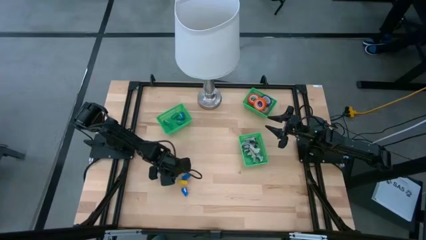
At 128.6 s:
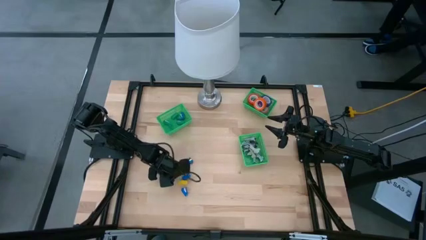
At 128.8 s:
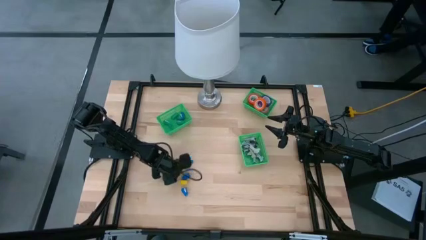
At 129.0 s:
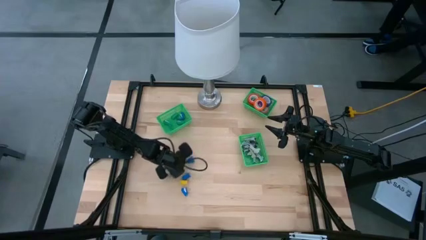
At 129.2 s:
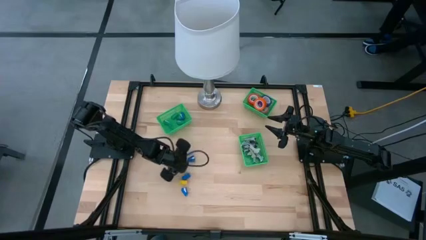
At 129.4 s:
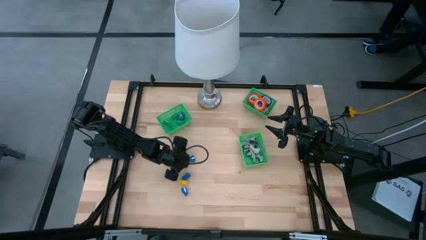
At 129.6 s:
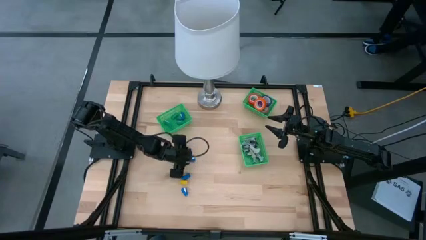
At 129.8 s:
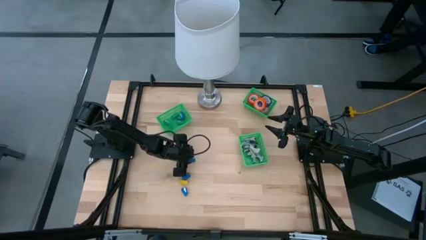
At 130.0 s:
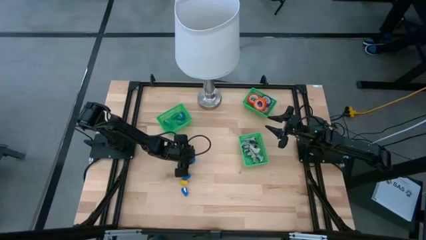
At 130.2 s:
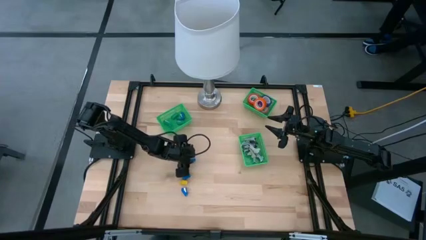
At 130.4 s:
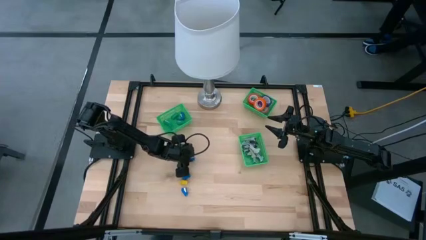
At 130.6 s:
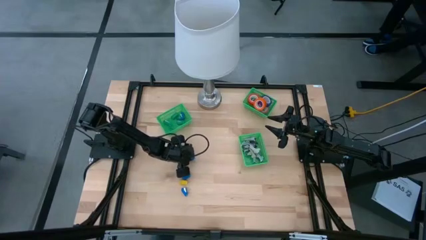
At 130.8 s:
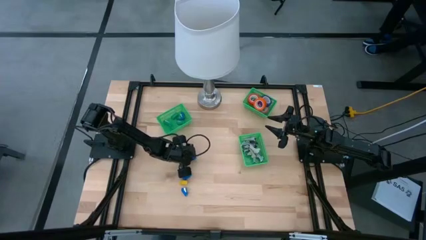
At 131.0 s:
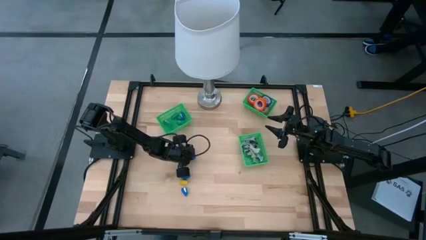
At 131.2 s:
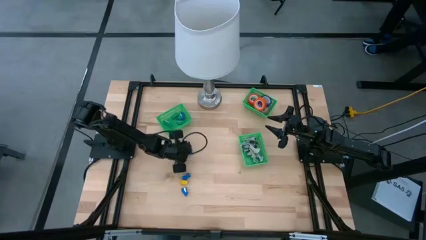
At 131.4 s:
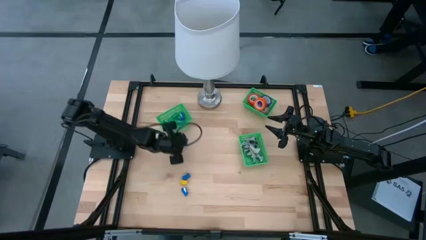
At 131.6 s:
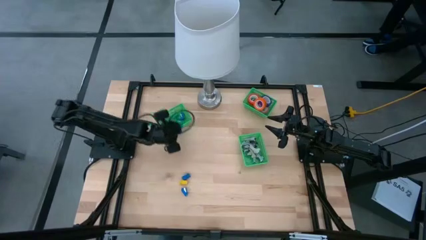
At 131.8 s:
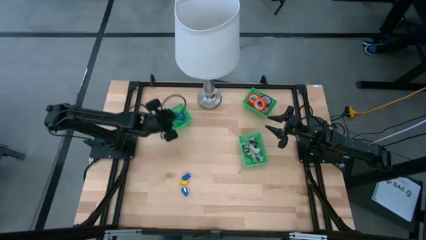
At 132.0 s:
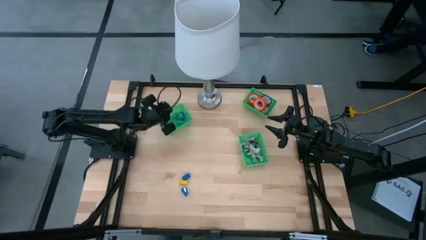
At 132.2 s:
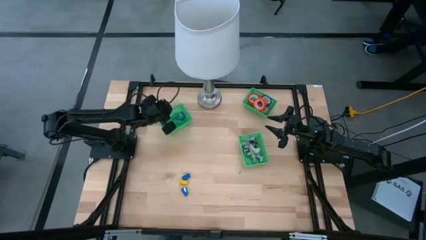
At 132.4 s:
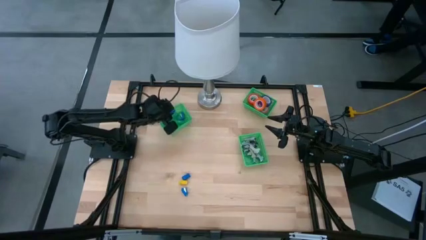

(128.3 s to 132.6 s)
Task: Pick and place Stapler, Stapler remover, tape
Put the blue stapler into the left green bin

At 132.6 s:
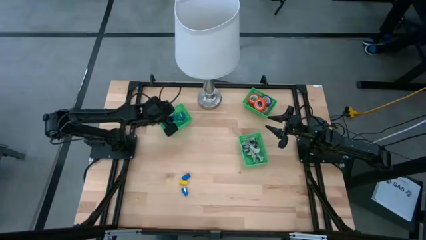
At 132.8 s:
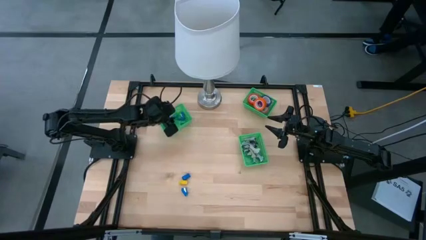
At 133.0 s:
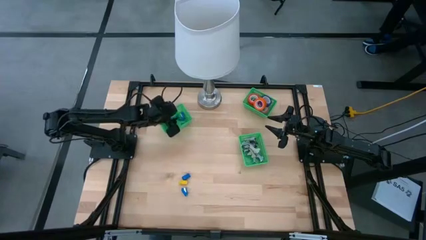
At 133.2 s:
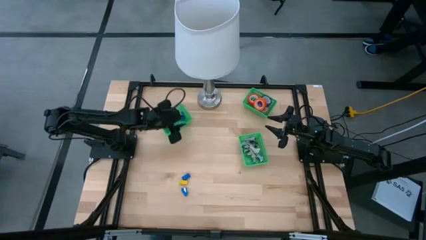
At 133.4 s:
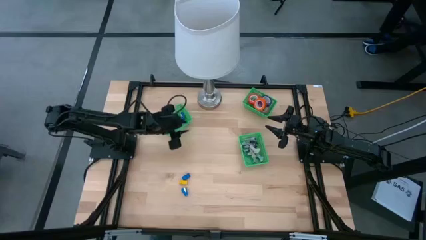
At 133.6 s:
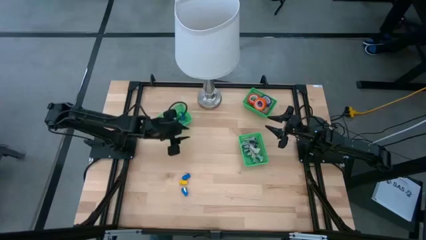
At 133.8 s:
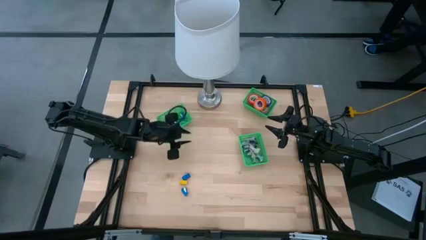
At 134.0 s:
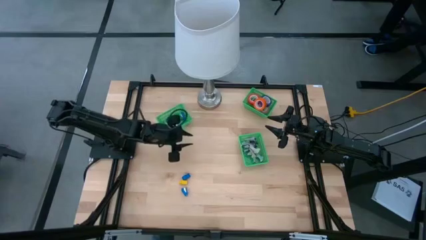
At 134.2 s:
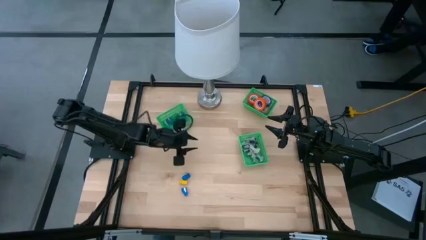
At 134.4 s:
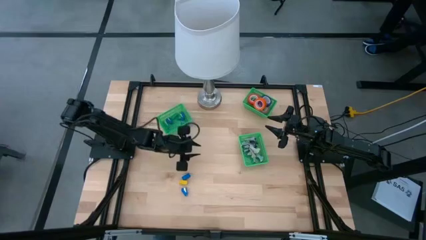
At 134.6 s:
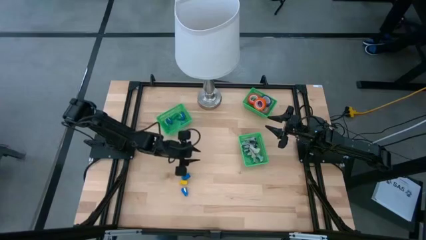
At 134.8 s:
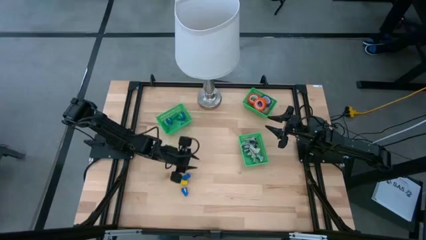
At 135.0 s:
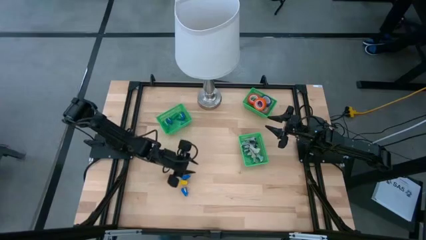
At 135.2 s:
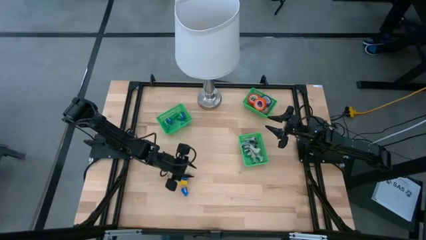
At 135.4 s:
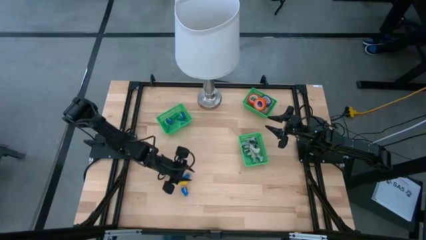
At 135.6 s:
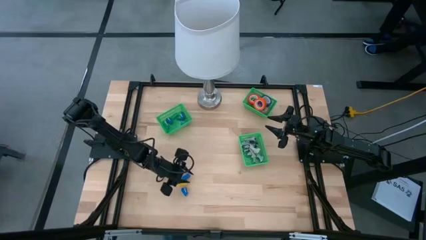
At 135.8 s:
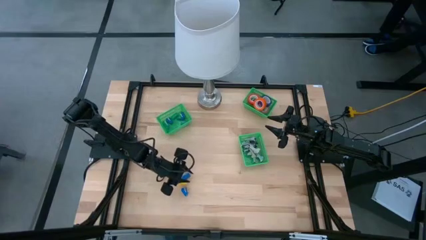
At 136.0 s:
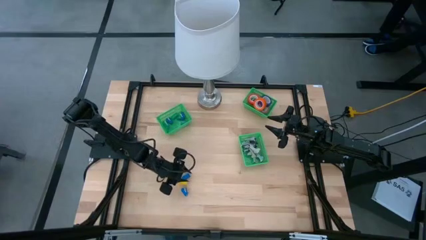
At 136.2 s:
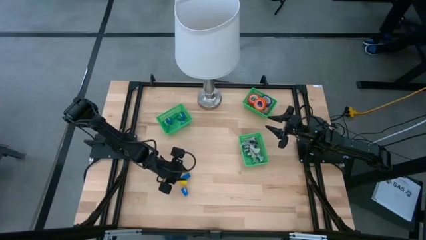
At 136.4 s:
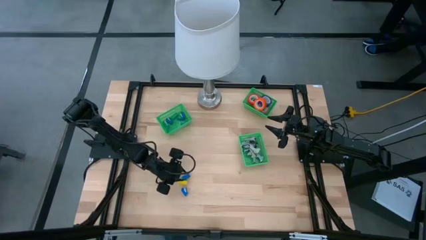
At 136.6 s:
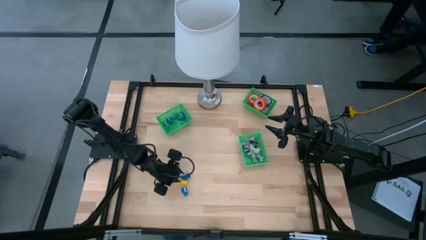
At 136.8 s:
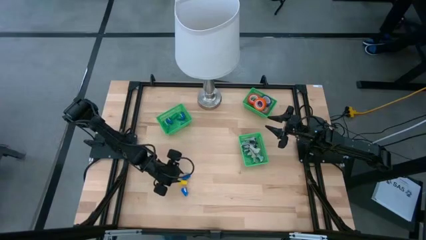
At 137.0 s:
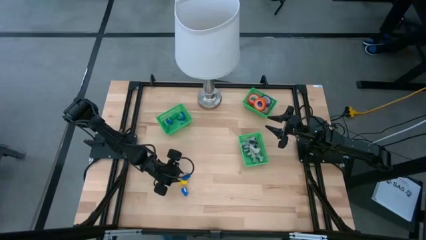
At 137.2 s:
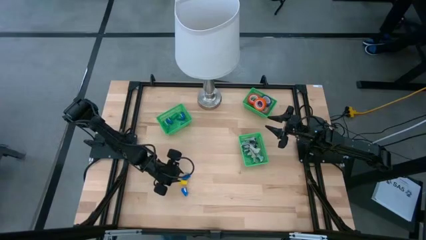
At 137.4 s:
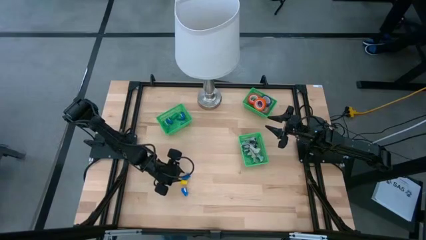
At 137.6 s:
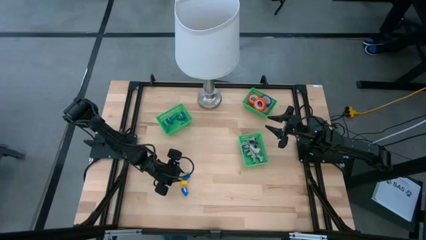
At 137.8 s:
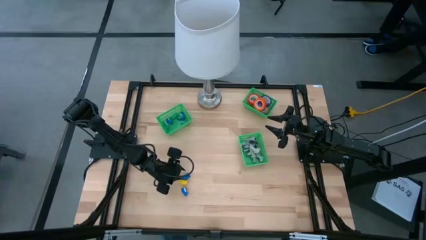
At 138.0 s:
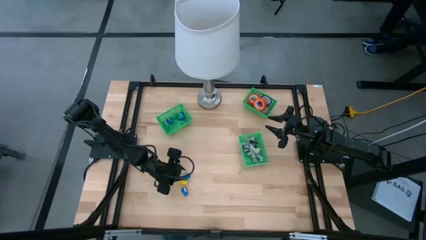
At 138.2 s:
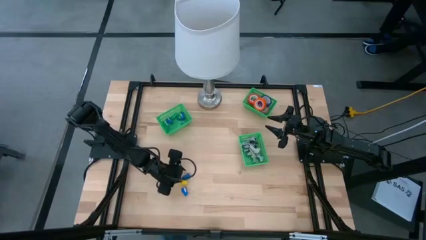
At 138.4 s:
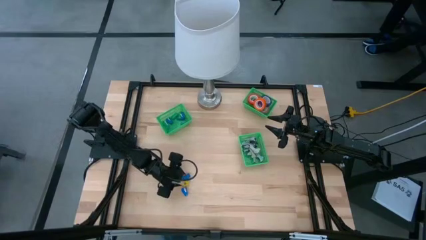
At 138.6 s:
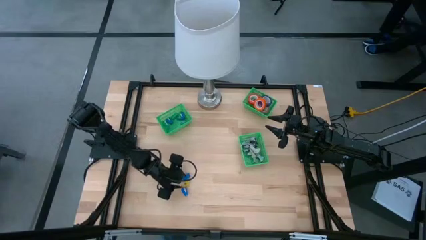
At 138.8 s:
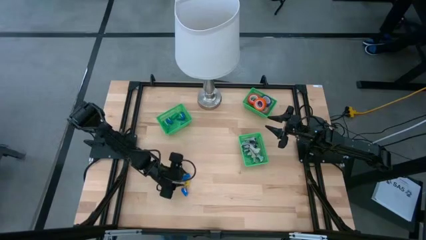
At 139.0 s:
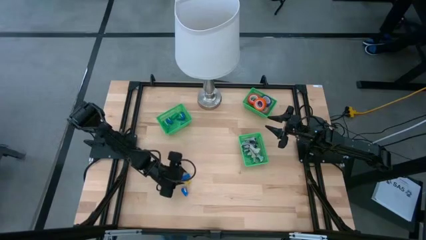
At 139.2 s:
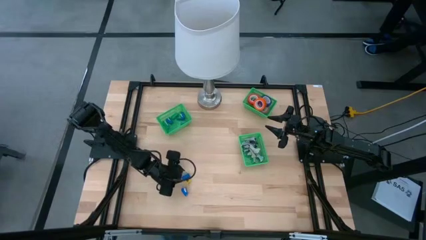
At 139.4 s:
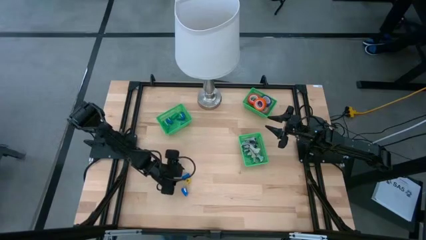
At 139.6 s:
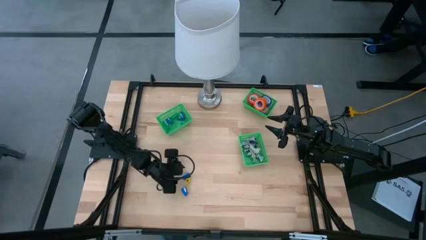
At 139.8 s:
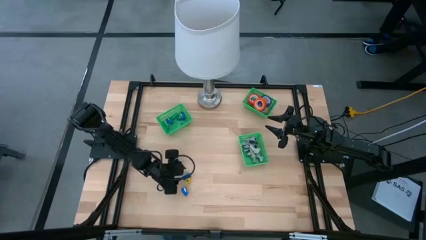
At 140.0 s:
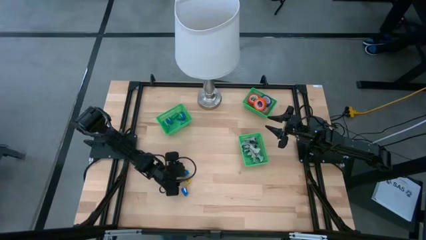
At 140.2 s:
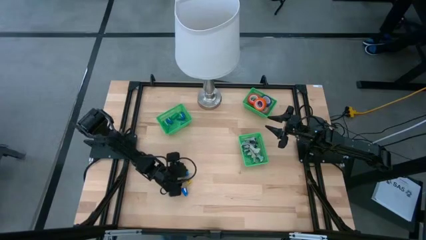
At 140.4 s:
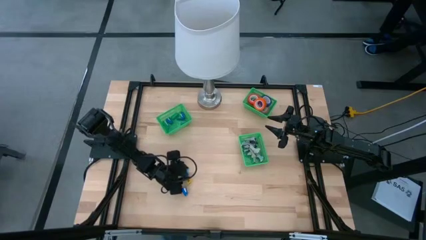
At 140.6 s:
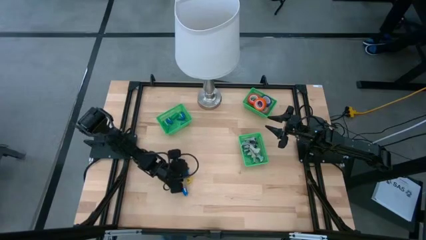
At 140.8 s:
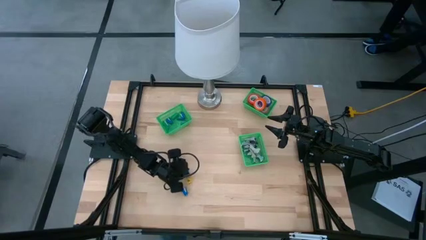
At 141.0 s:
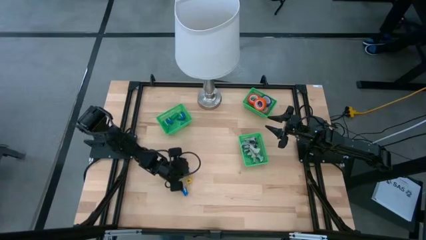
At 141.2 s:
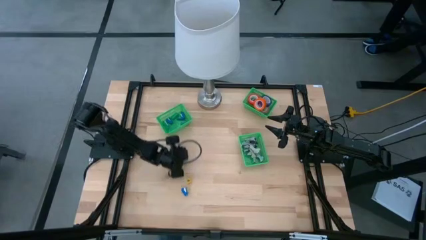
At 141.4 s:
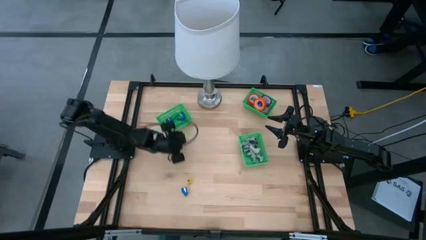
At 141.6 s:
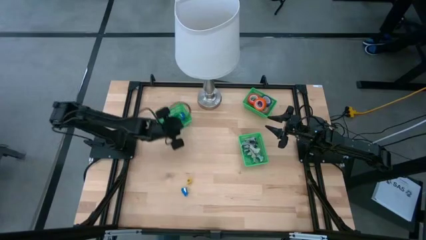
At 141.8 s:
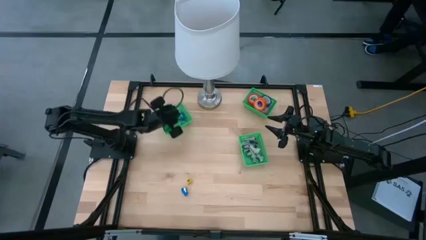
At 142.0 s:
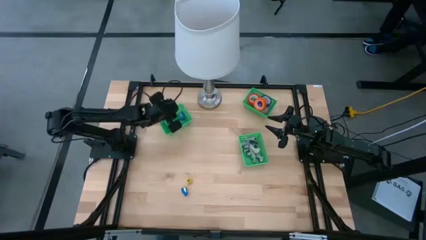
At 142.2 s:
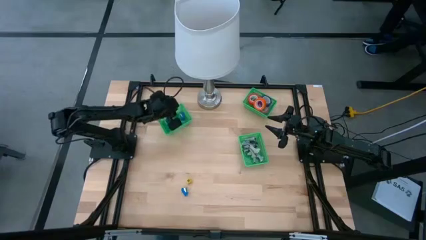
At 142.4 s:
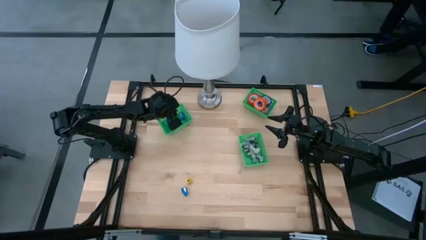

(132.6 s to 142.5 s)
Put the blue stapler into the left green bin
